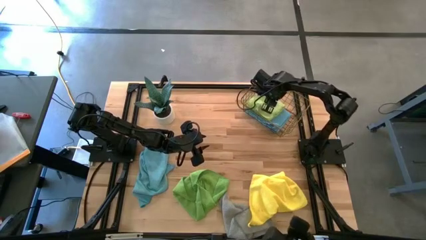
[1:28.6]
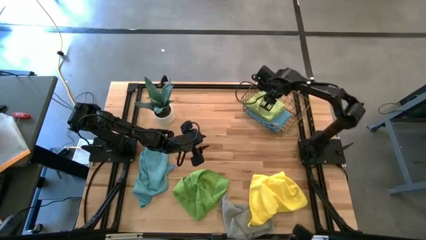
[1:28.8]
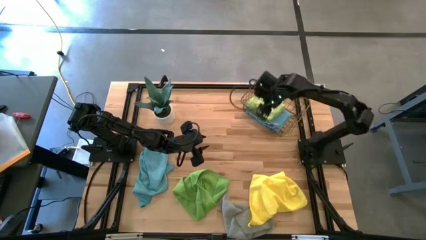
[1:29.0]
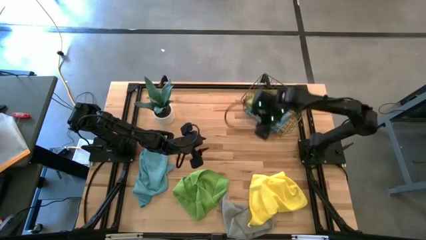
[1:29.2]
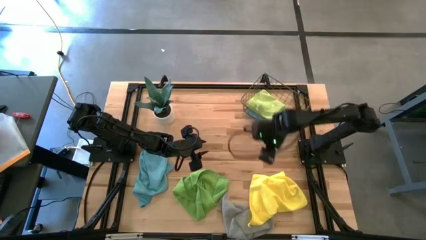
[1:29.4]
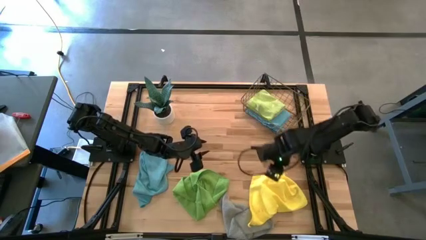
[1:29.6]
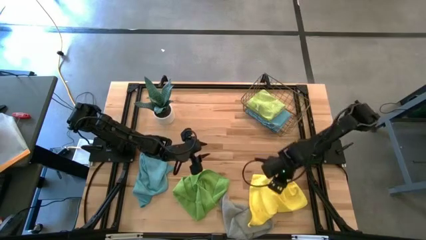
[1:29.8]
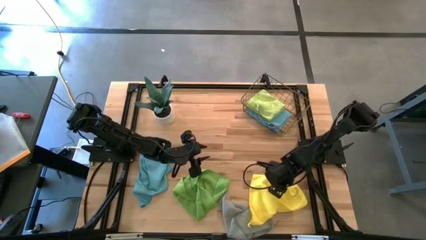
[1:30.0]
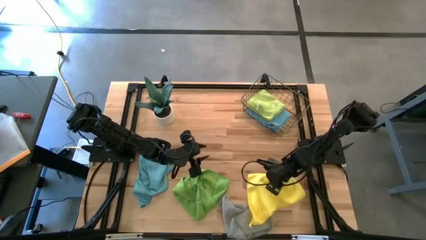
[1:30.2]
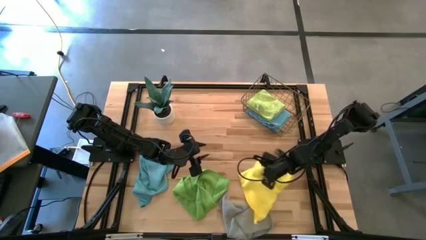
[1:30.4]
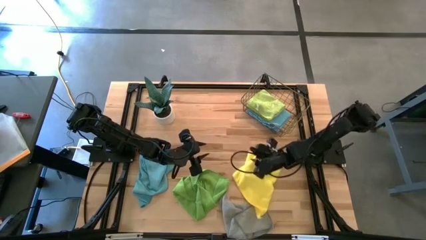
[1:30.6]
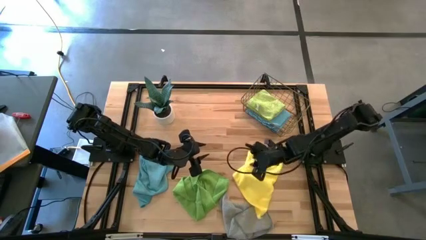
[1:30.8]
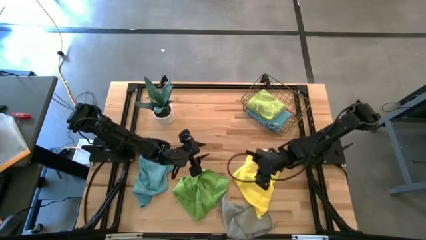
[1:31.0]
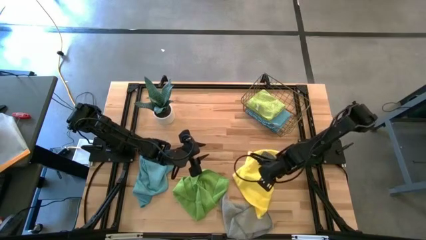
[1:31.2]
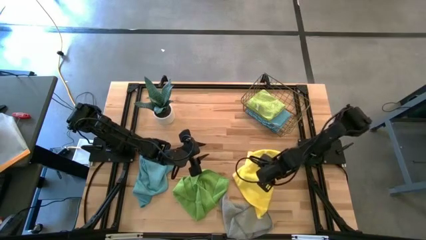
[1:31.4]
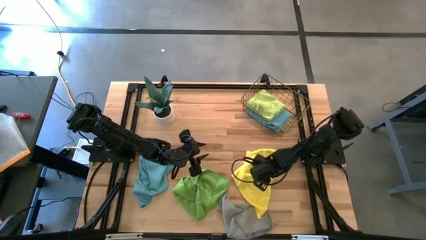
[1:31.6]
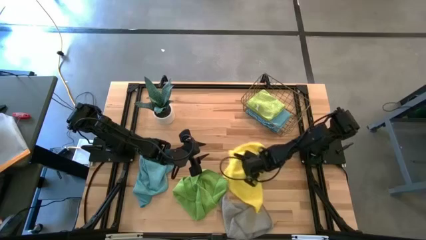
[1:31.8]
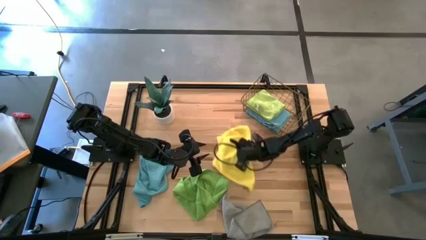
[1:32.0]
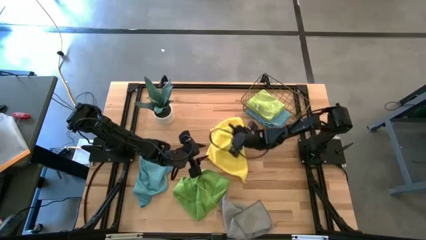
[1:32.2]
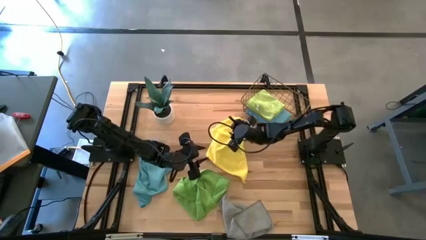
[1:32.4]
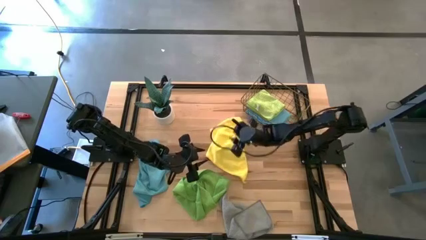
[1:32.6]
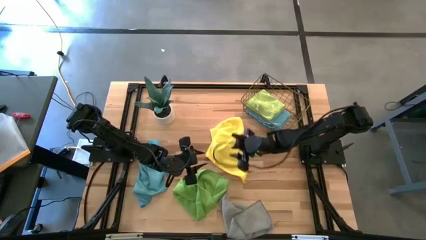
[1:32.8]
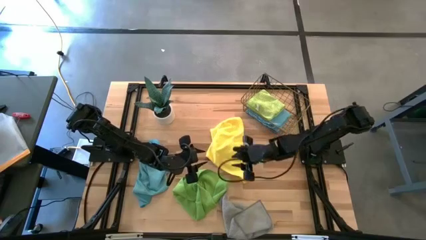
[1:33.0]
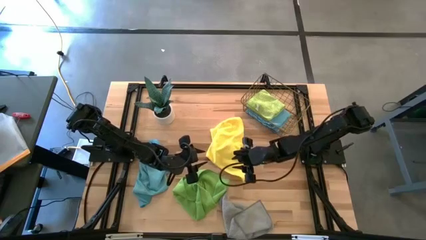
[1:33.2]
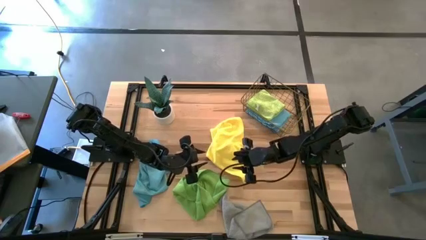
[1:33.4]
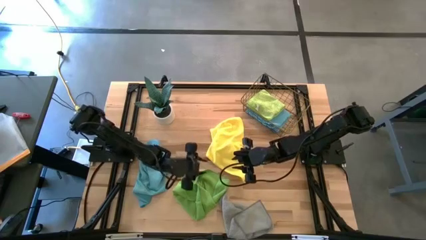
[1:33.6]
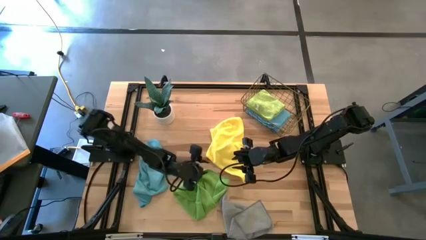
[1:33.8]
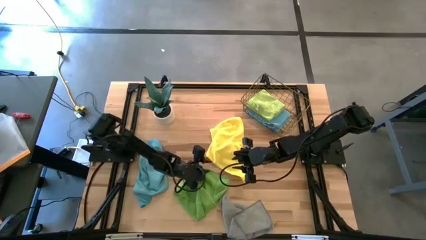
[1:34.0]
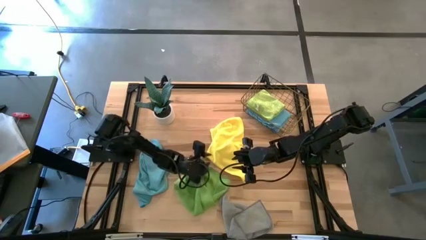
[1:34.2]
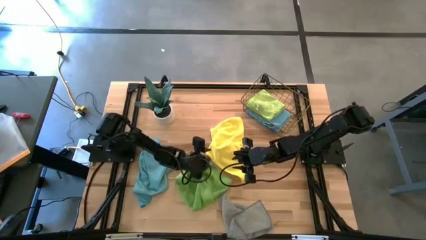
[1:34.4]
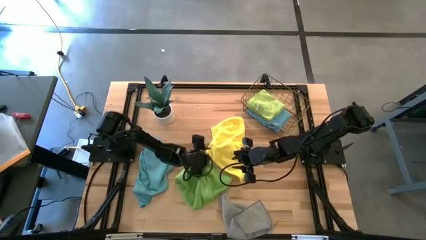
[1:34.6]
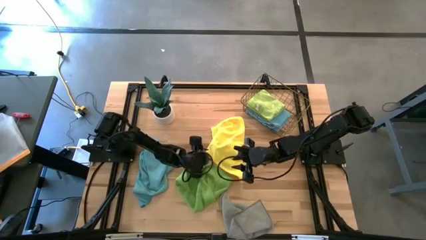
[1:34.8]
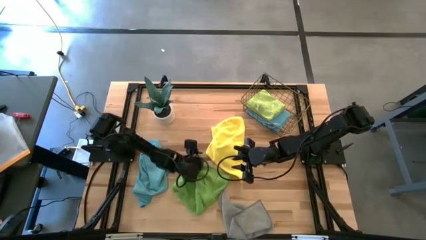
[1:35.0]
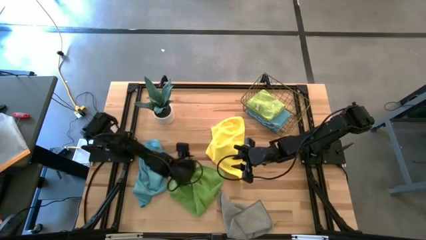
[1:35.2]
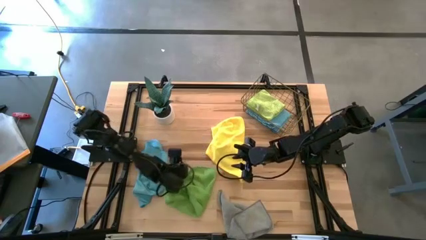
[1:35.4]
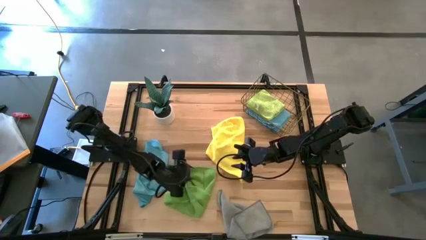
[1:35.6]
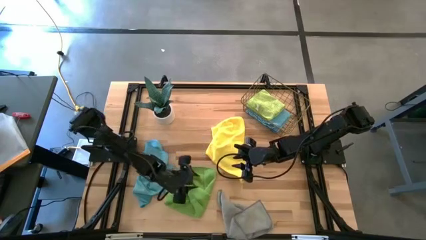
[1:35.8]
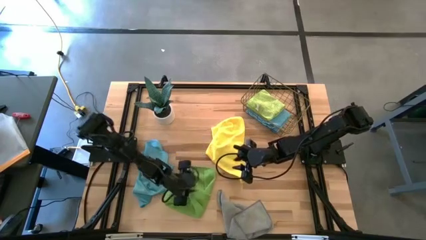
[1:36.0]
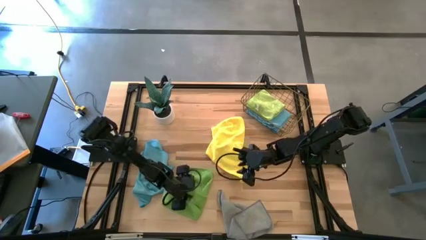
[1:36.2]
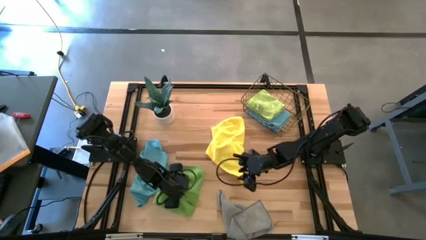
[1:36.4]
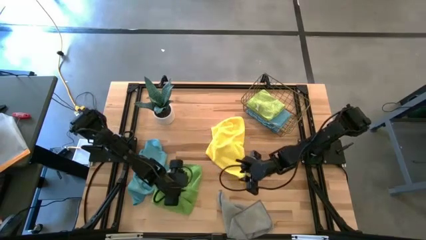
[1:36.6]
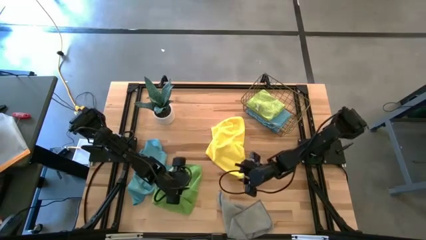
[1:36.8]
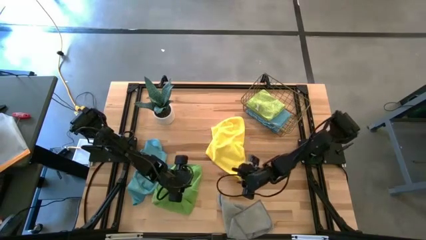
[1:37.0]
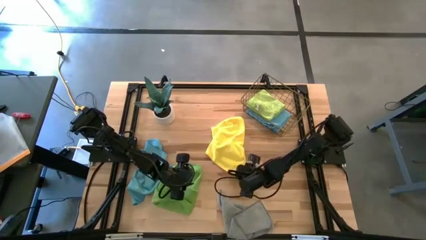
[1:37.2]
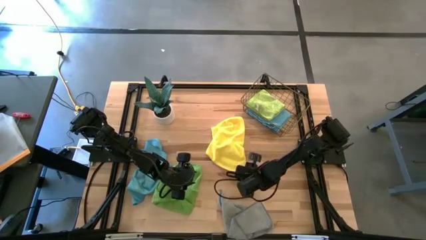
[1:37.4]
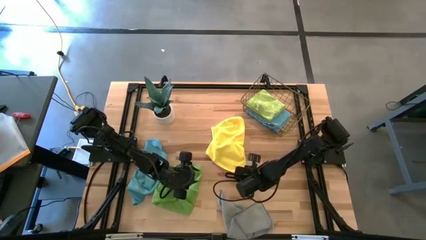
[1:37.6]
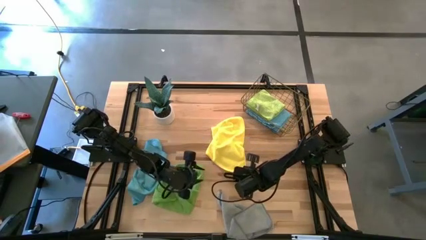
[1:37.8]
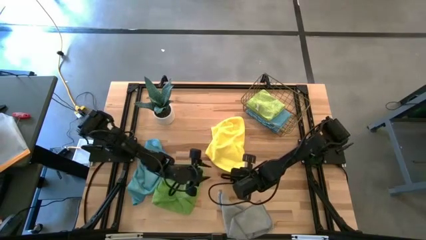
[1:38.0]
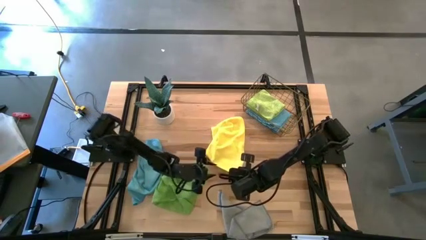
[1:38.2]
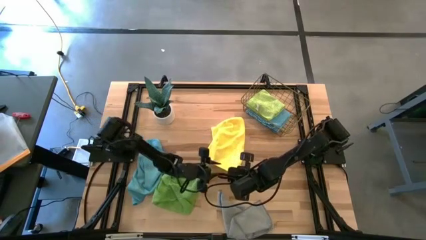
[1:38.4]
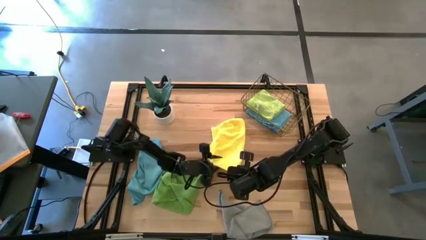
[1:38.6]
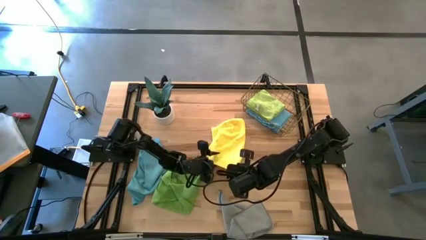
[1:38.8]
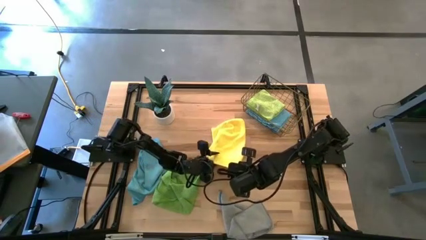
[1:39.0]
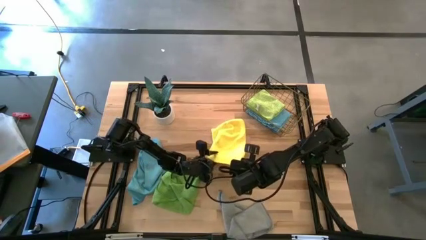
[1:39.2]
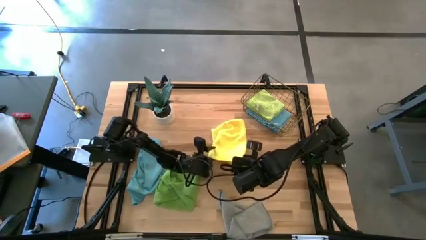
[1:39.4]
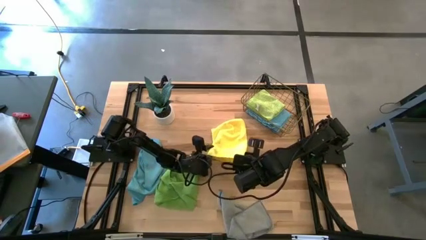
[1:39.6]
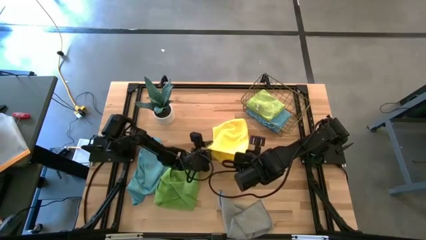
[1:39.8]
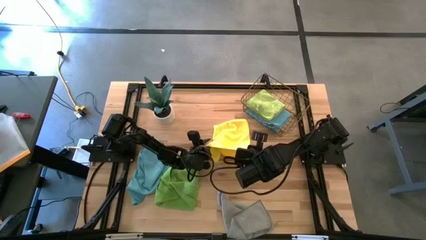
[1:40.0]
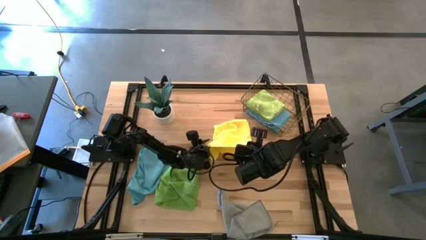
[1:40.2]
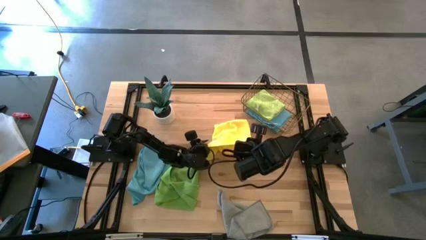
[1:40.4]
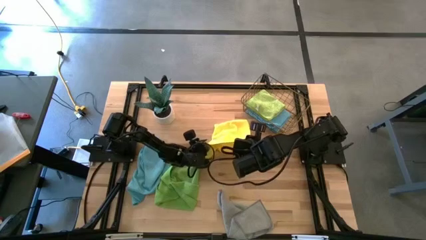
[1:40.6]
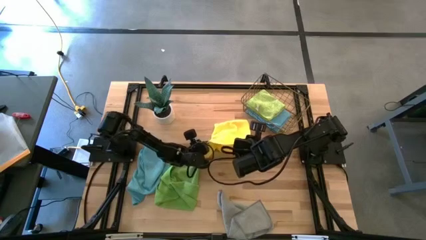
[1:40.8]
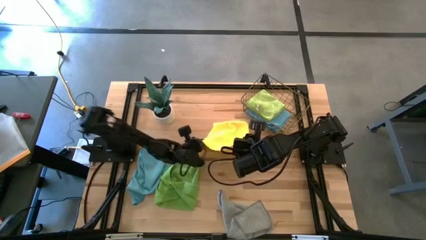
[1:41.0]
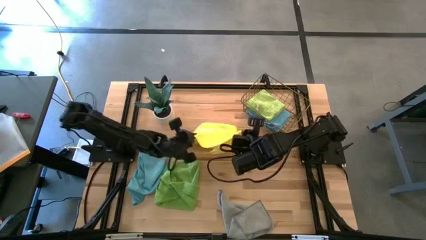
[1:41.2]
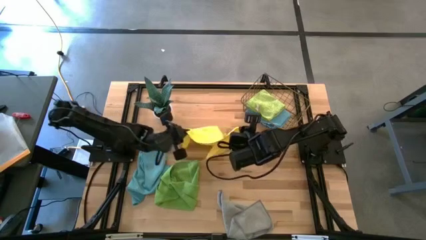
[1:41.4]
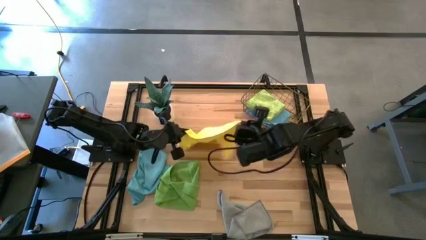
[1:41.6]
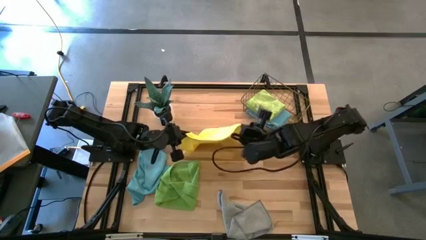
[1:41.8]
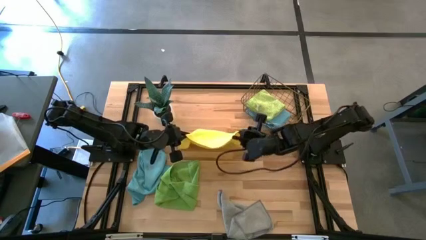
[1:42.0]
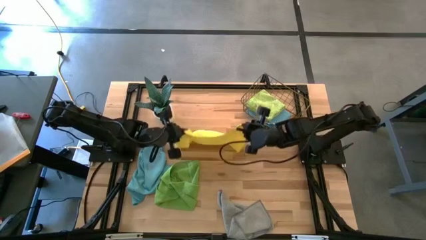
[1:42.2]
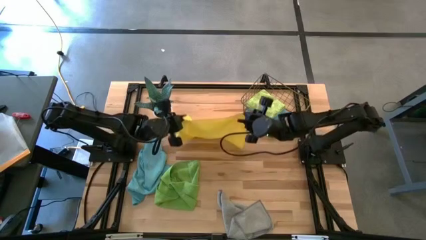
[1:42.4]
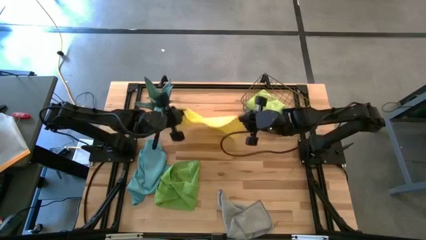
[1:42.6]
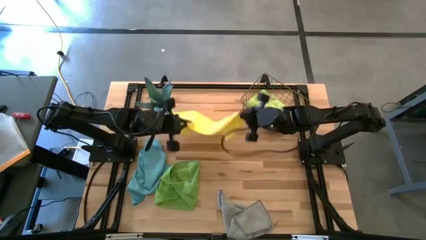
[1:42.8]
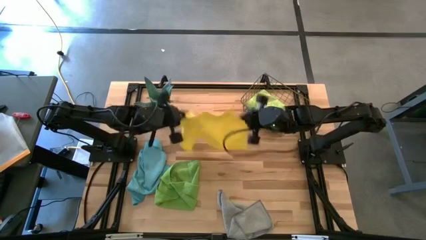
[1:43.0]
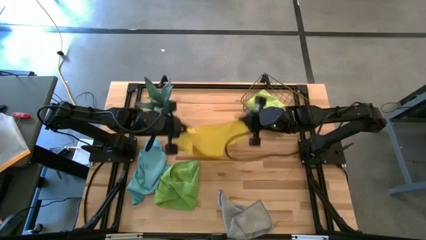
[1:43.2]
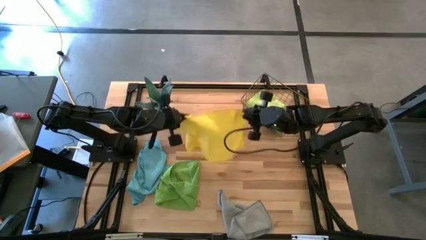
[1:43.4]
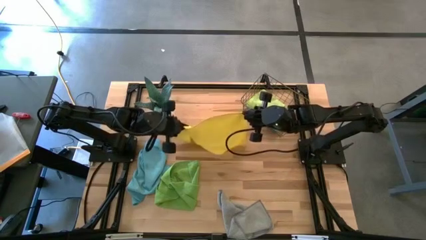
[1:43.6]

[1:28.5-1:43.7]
Task: Fold microfiber towels
Fold the yellow towel
